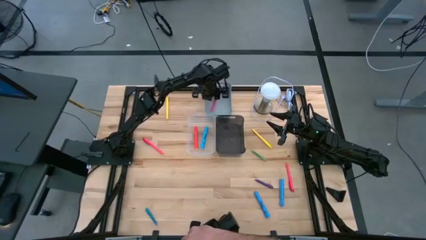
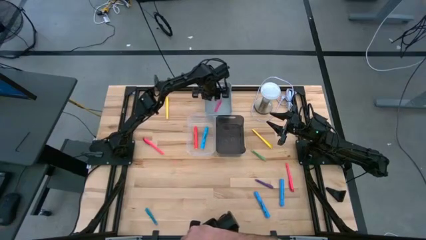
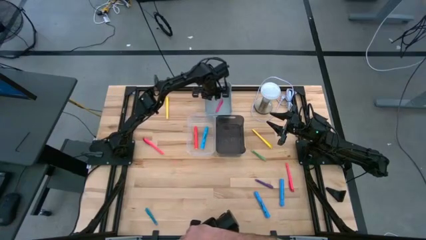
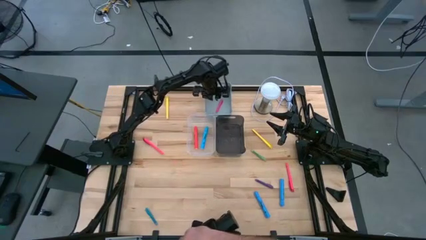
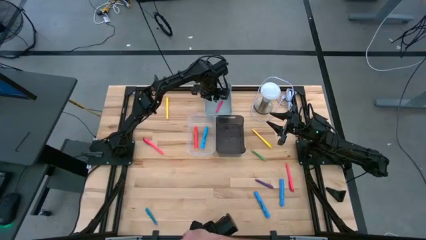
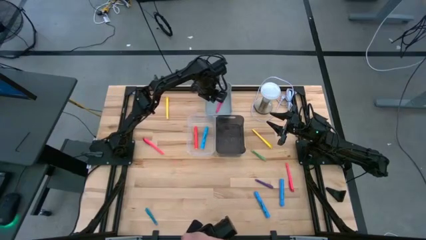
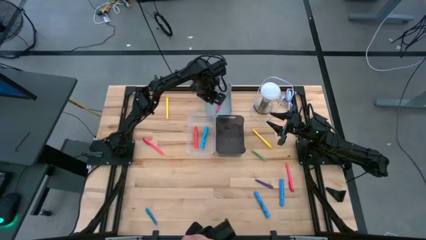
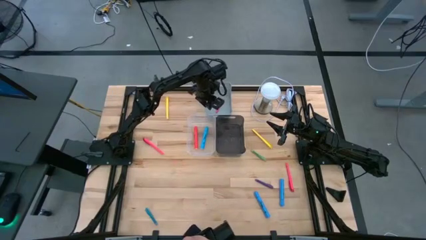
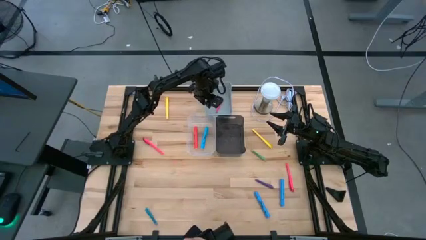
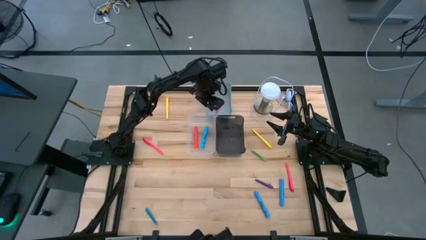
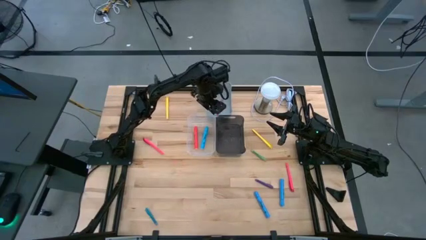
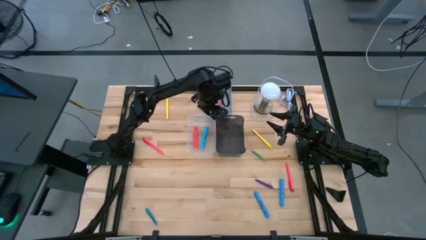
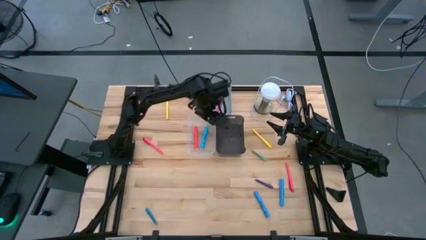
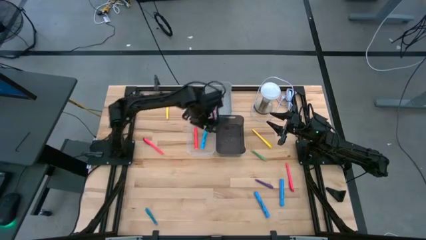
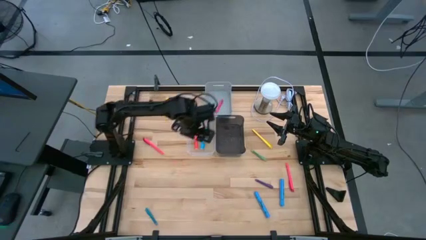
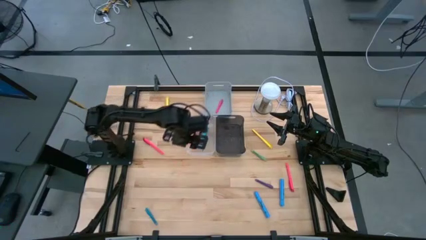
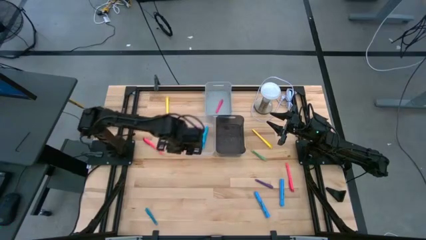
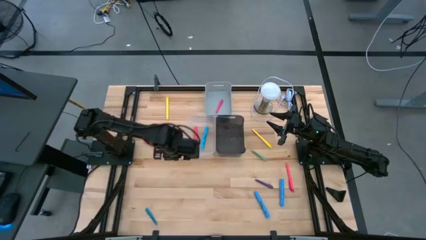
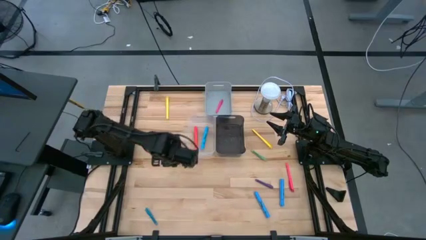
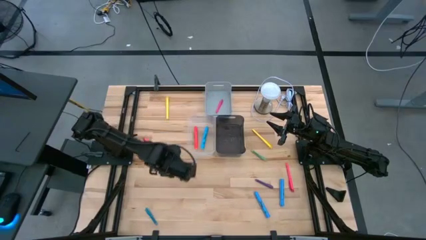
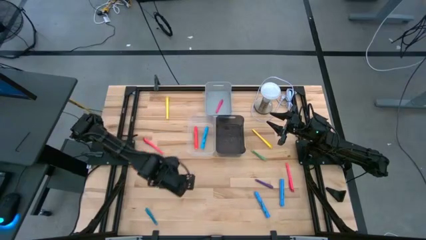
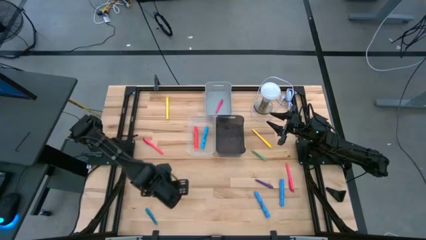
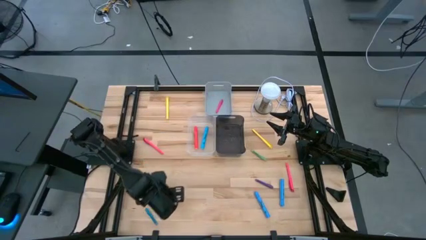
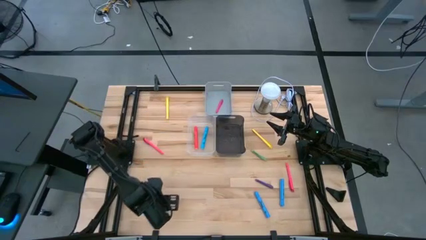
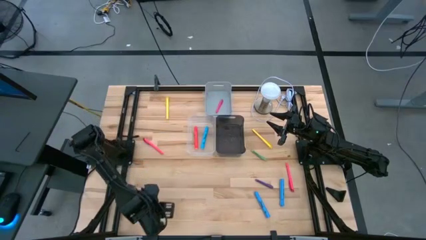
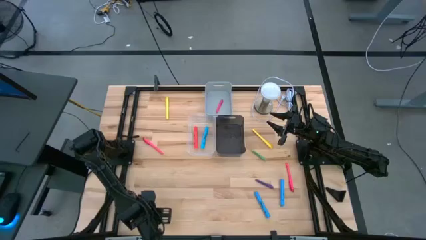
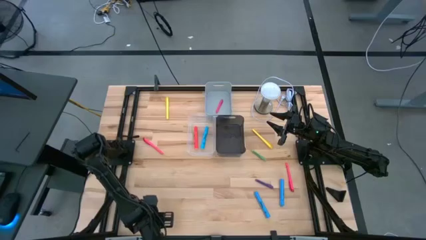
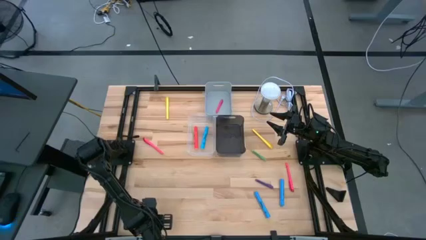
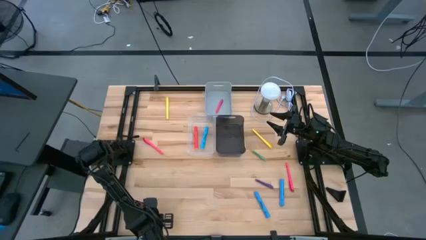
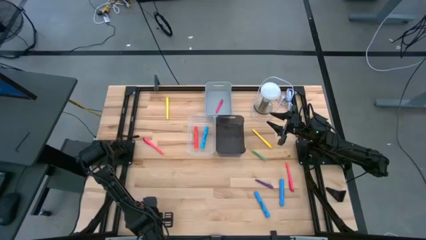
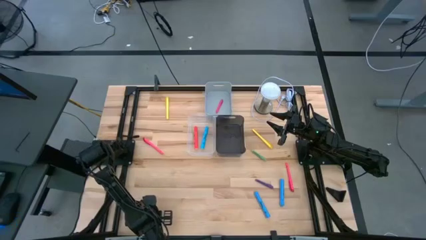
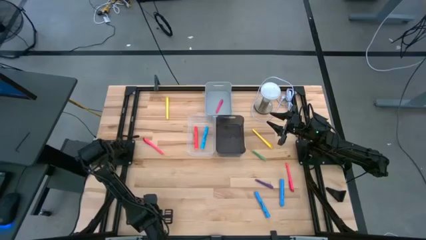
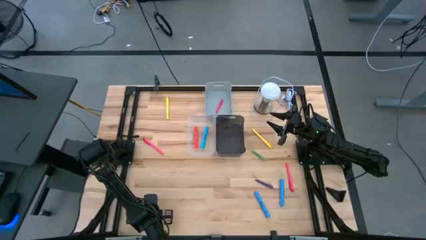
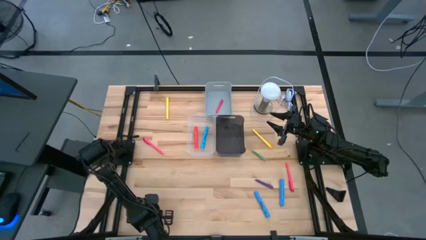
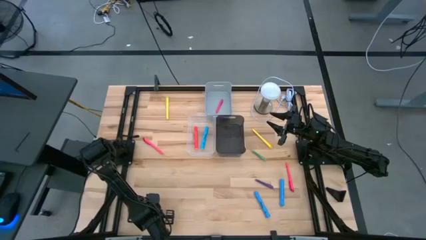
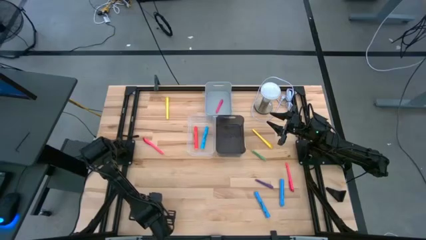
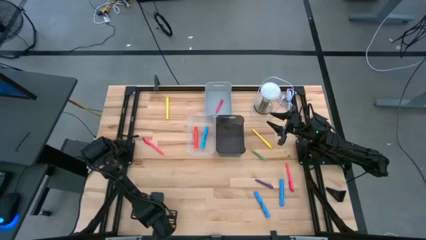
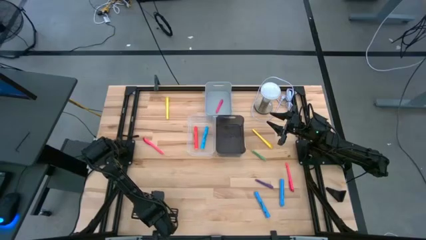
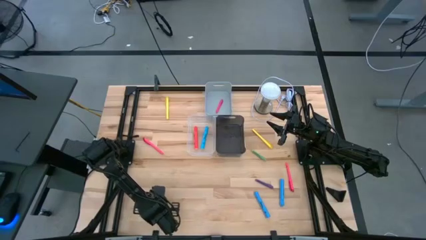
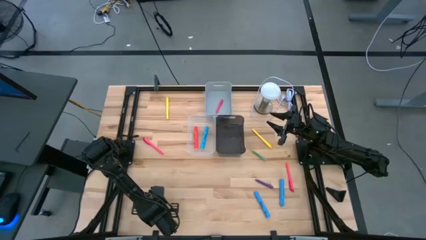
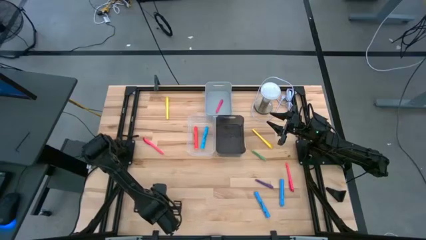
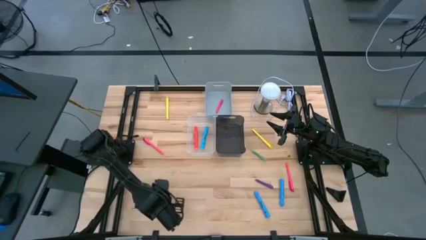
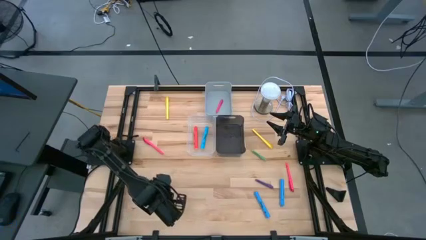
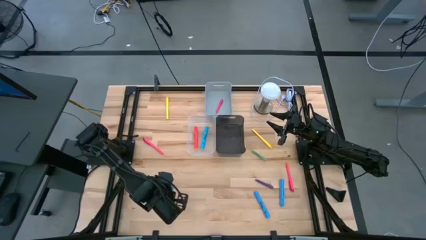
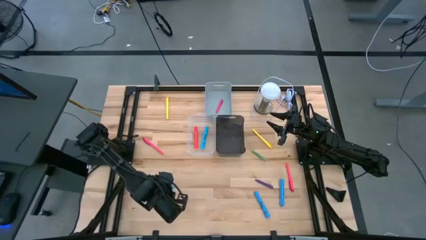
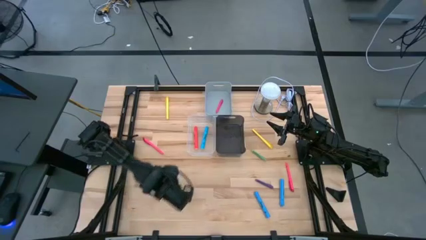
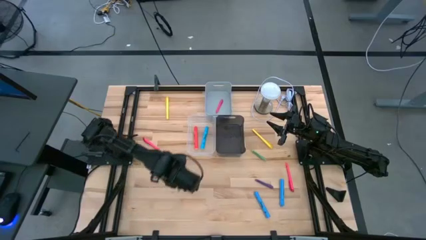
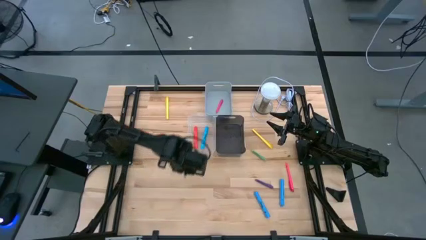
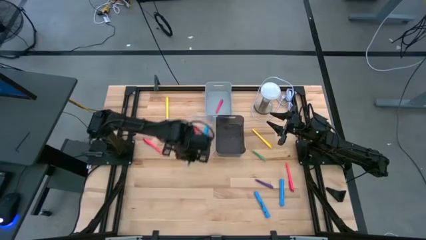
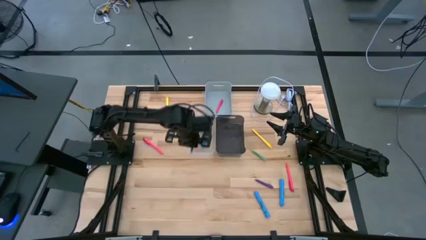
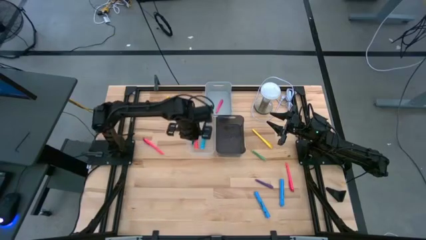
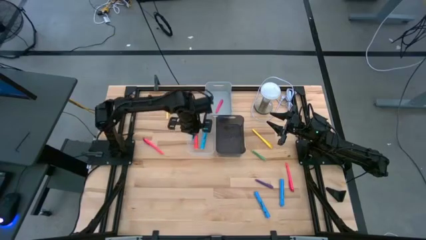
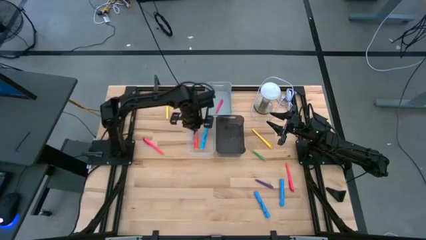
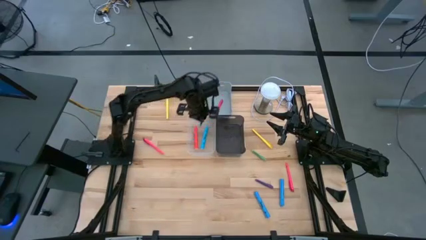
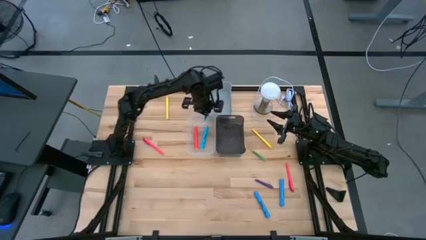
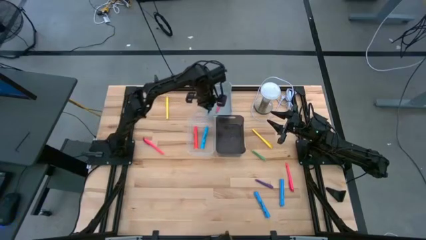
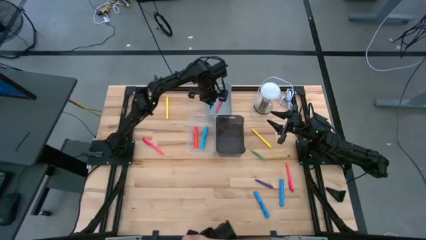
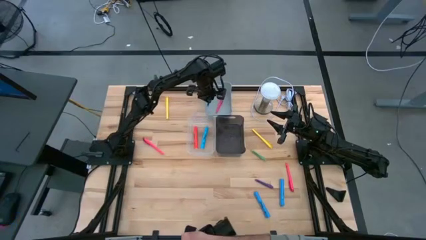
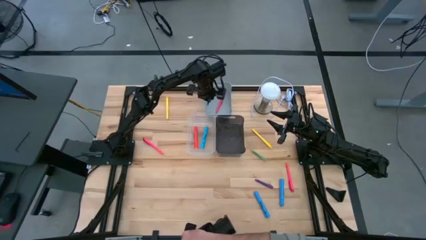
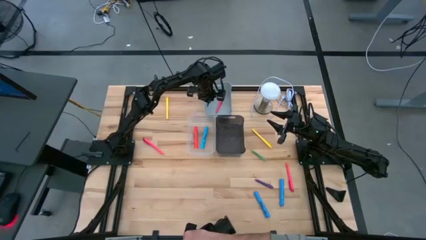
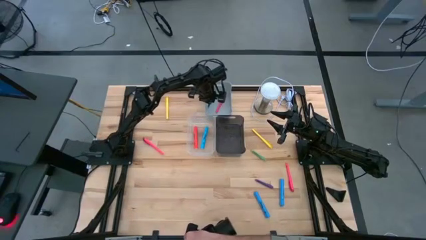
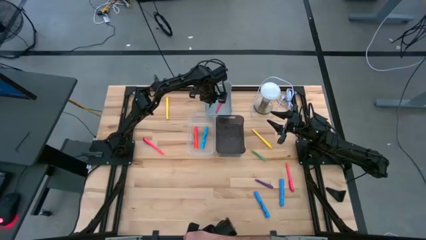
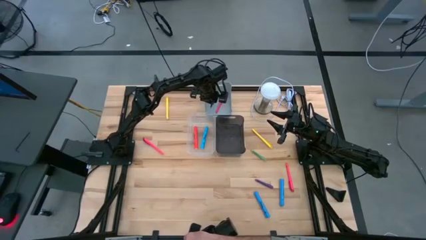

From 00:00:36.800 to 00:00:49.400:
Task: Pick & Place Markers
Put the blue pen into the gray bin
